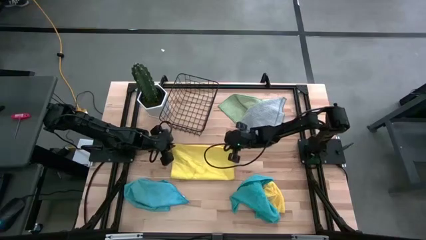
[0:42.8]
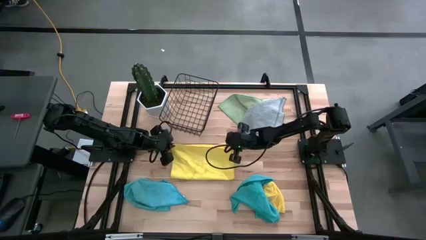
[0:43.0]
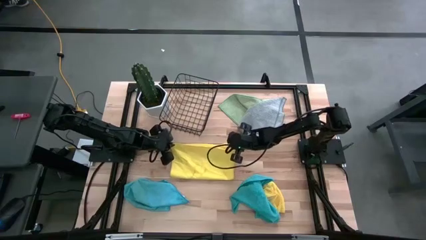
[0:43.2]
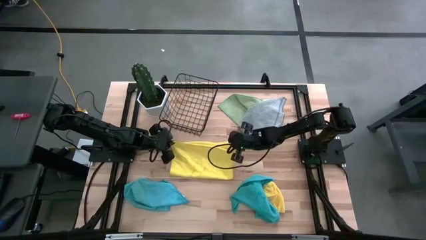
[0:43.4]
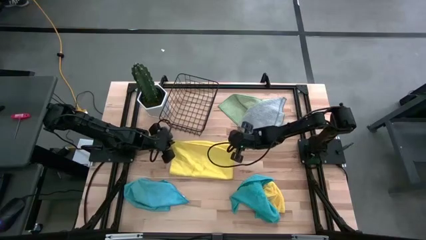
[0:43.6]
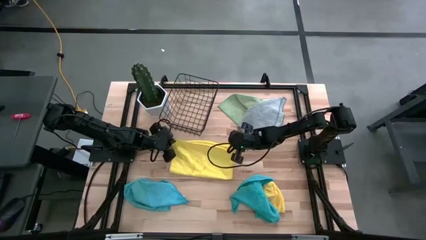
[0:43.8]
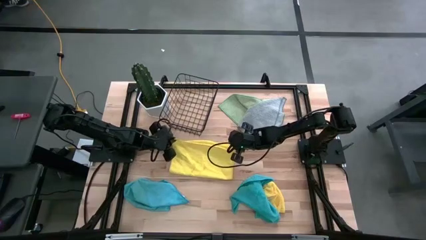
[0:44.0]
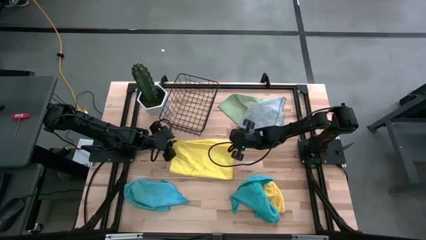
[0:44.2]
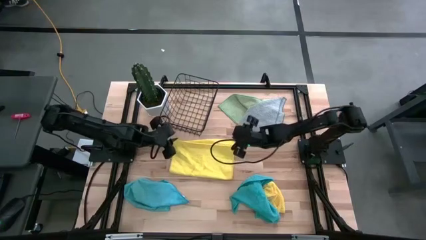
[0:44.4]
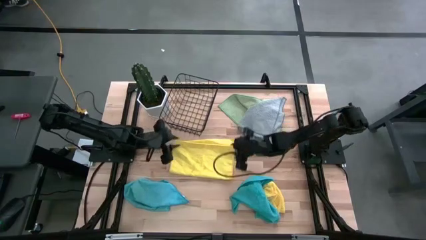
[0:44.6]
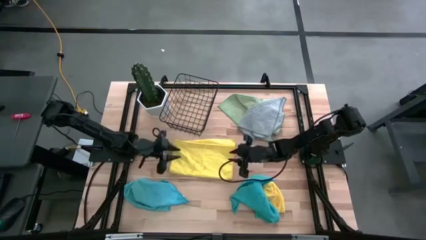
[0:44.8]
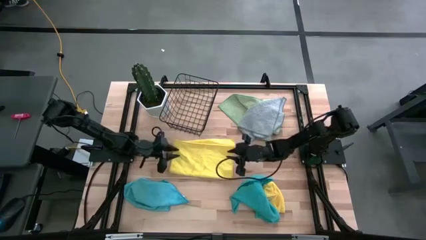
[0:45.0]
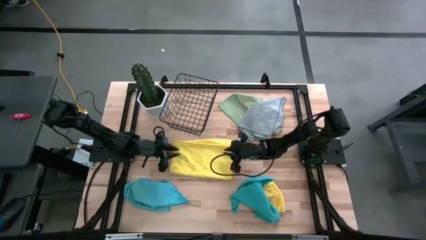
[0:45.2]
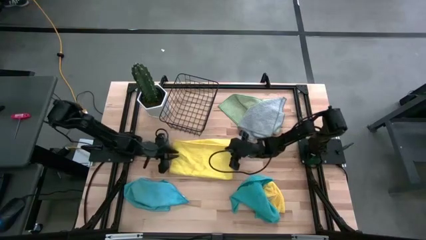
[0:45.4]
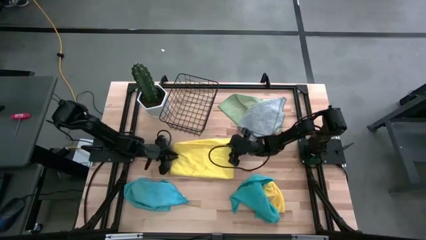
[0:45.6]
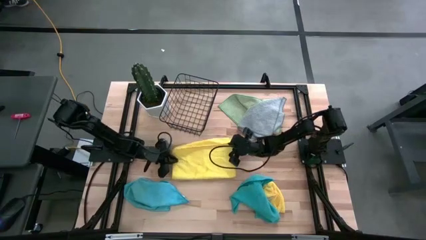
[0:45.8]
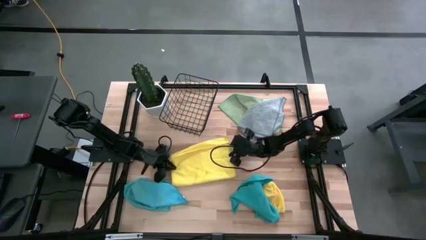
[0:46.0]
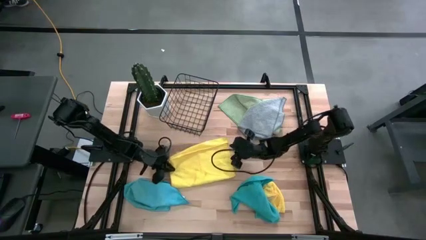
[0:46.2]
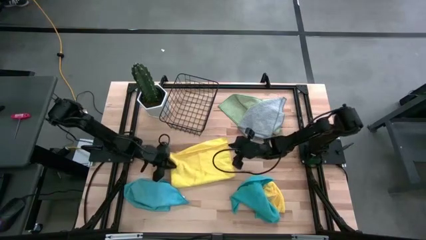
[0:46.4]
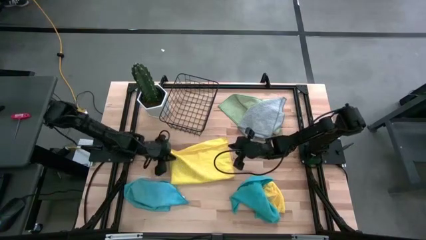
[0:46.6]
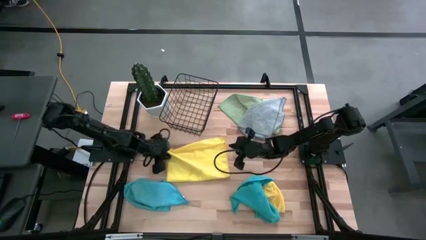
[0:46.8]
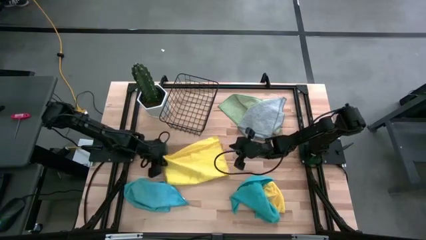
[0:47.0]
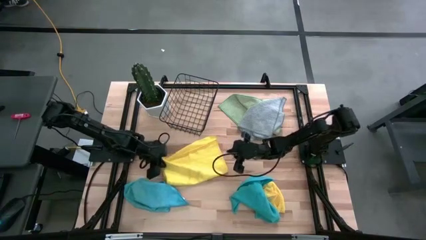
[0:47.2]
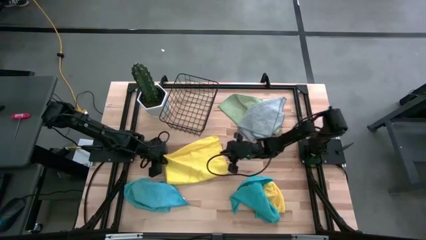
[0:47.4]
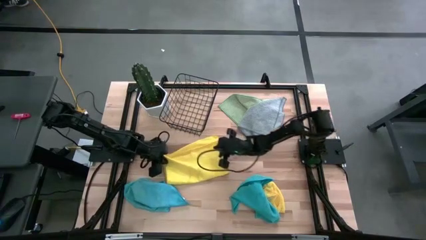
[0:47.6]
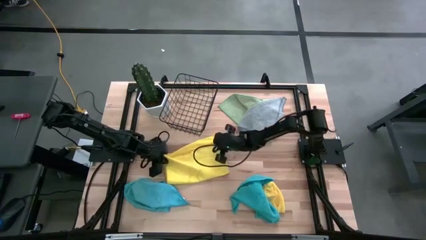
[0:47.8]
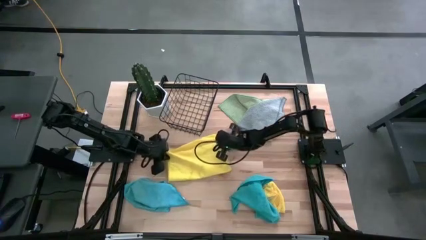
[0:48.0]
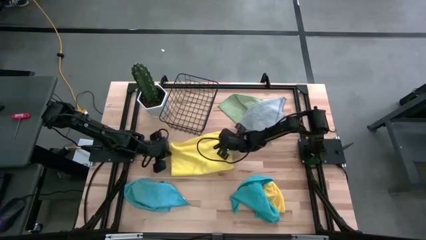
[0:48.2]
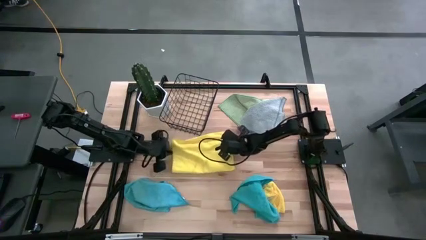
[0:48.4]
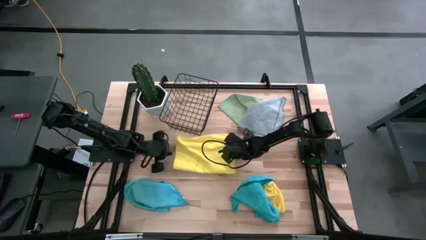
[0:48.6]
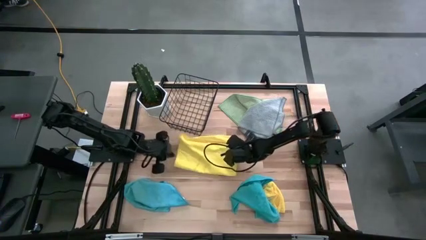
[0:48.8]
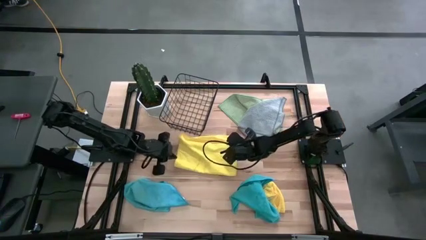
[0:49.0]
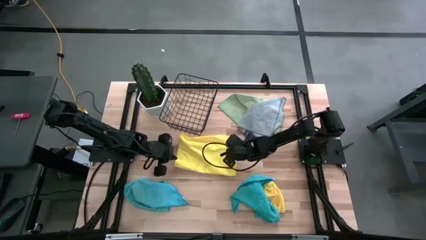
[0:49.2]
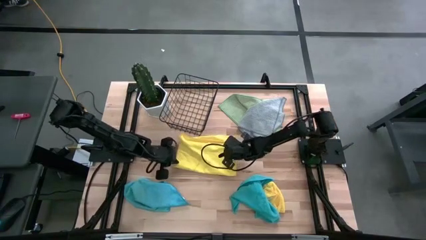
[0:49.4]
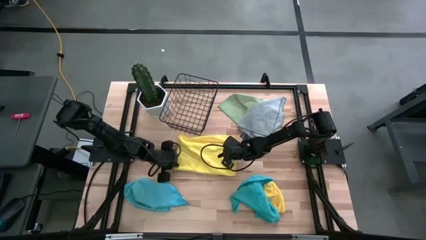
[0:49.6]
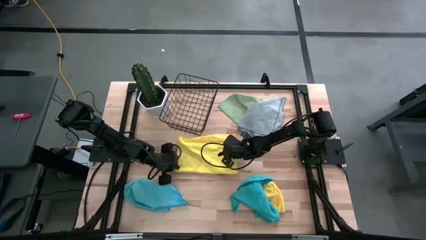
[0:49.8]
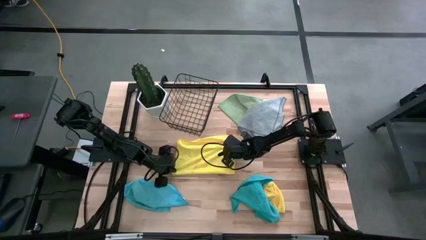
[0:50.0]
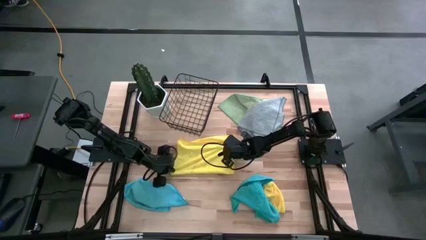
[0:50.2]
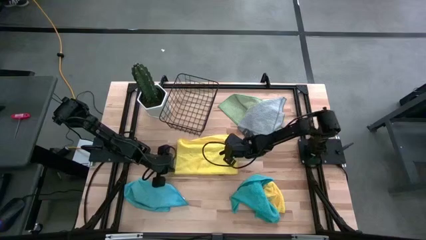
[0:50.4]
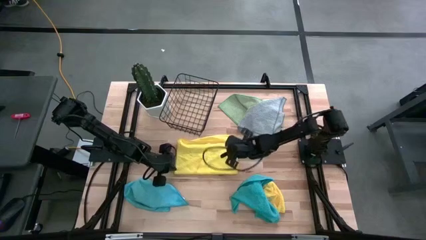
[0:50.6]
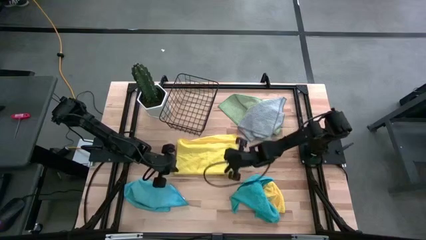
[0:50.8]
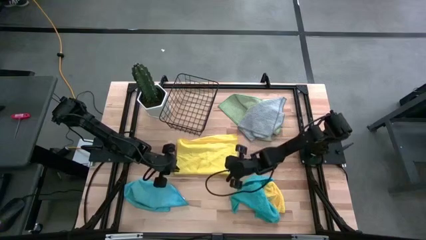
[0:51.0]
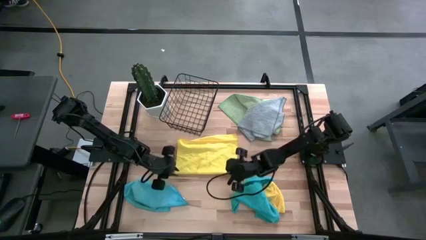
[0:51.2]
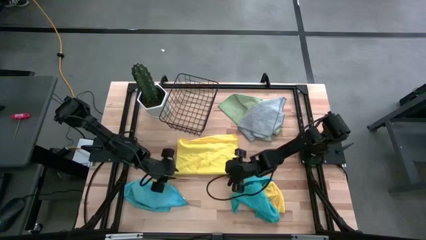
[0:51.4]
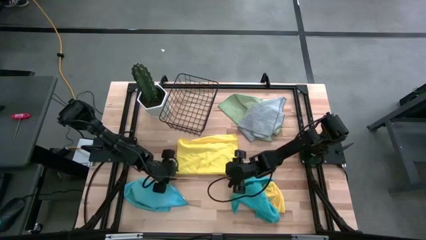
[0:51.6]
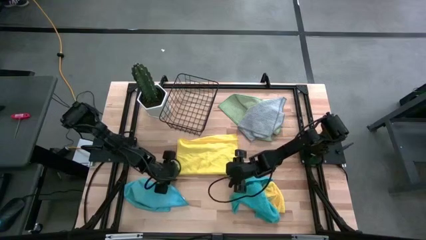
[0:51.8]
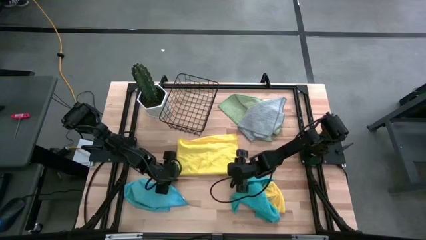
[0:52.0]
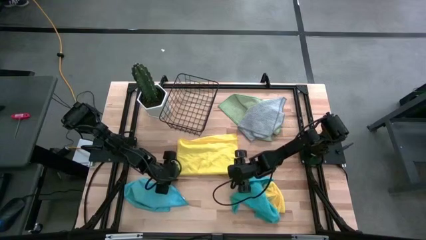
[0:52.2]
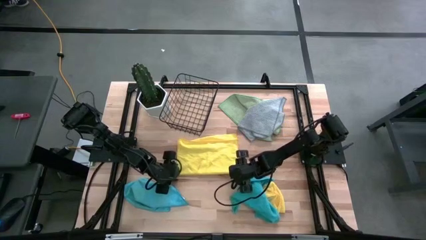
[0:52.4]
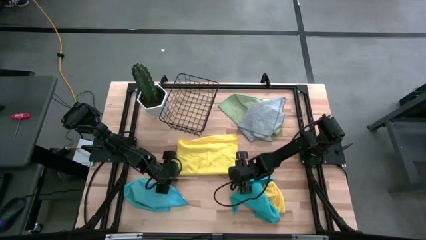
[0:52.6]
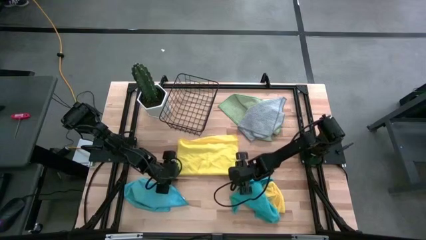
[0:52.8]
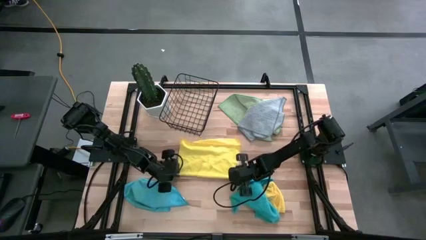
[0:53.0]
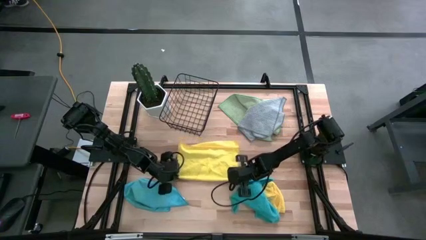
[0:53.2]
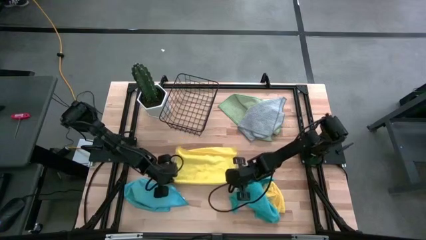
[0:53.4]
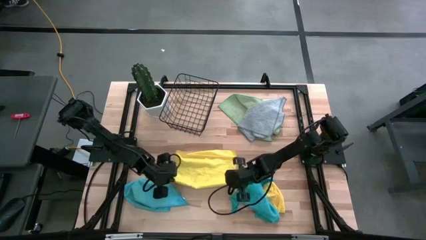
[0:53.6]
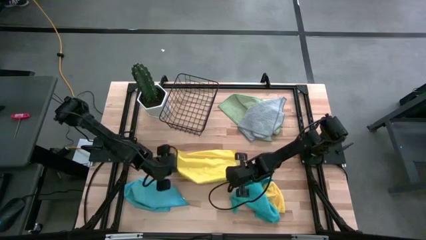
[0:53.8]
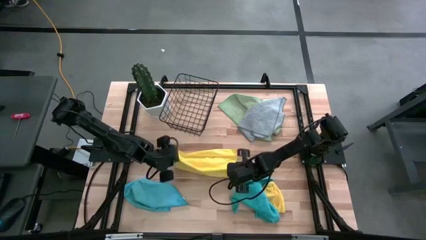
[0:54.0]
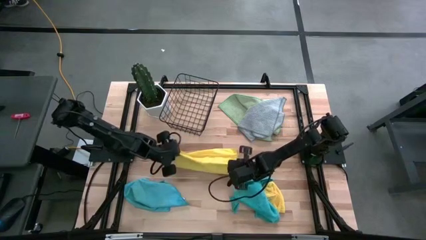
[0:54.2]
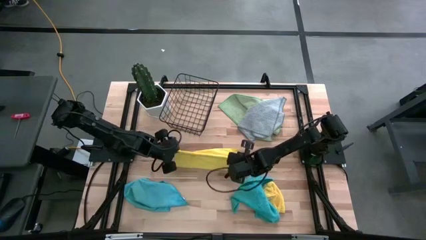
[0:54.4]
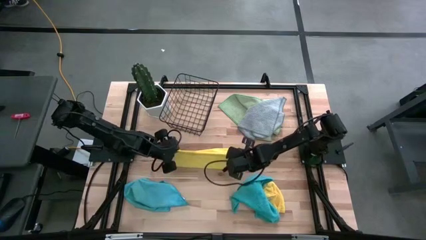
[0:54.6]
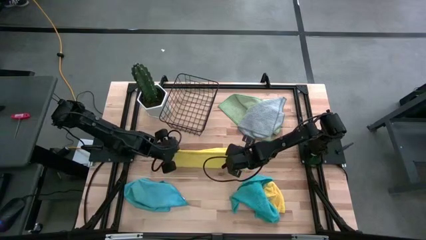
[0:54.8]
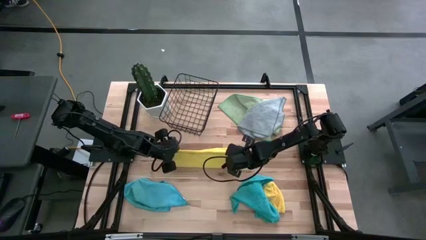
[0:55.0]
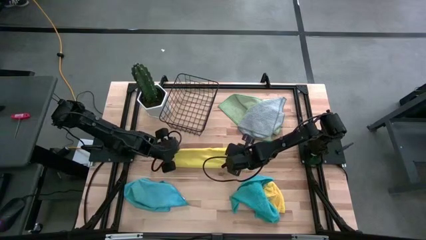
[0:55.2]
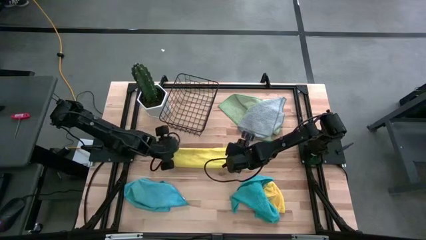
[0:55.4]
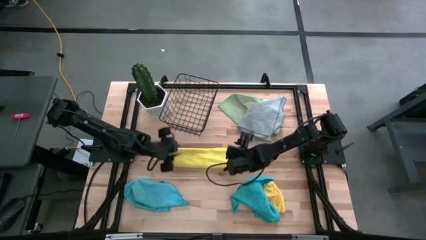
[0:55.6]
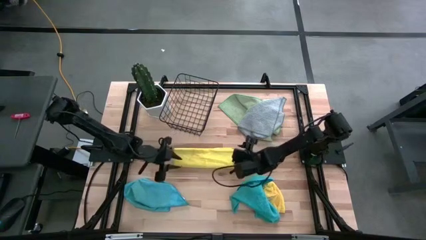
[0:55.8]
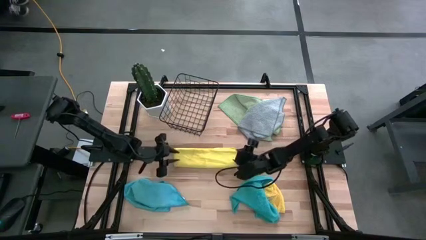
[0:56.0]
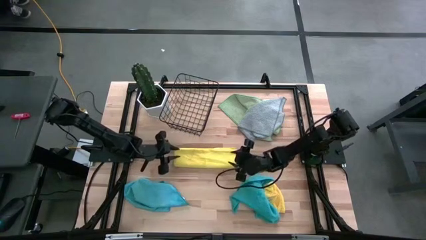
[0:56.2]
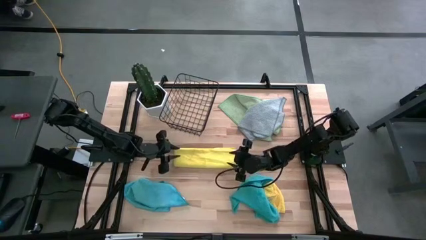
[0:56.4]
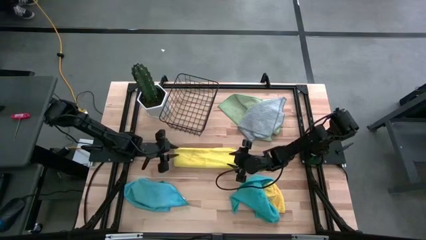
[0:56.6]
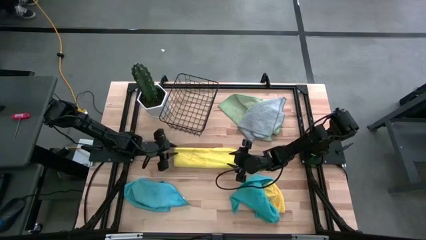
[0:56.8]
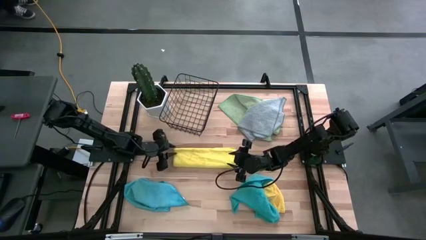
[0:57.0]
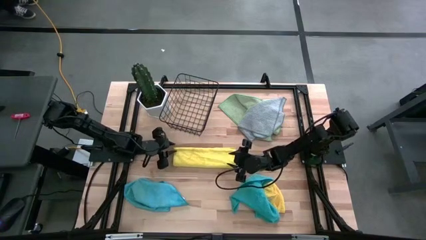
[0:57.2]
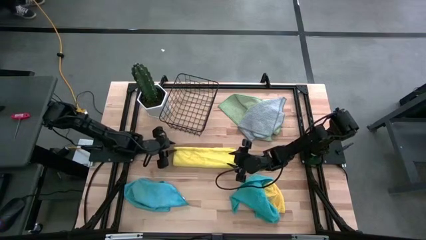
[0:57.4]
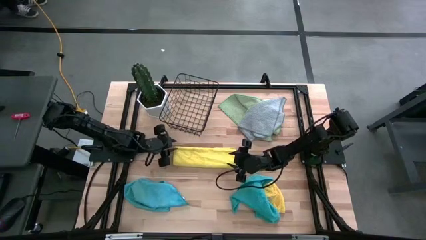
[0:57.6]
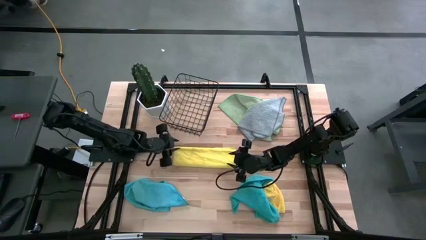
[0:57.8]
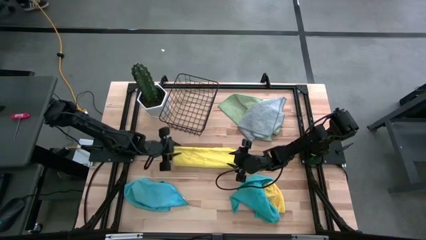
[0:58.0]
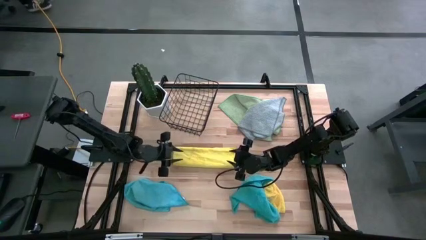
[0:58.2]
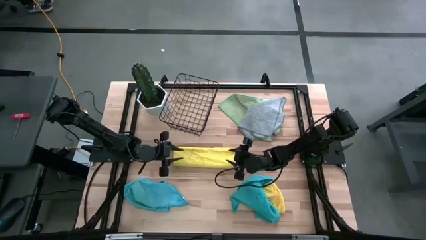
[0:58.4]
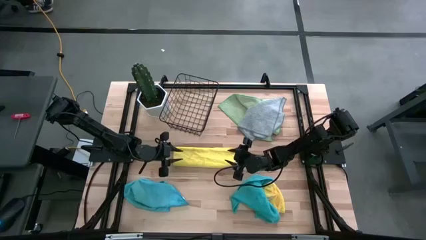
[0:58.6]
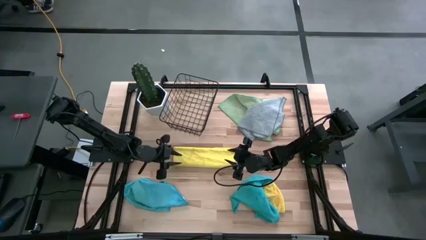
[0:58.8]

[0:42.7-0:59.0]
Task: Fold microfiber towels
Fold the left yellow microfiber cloth

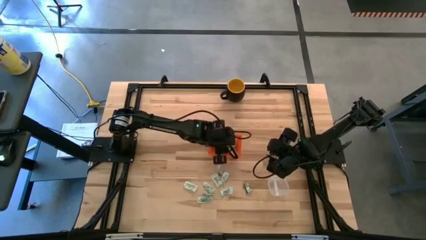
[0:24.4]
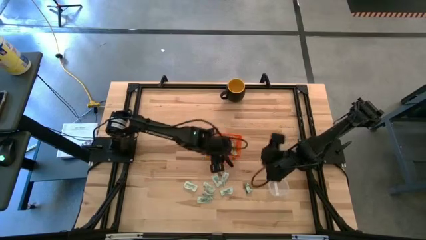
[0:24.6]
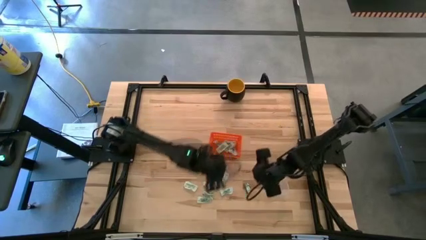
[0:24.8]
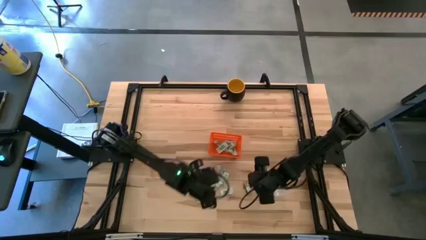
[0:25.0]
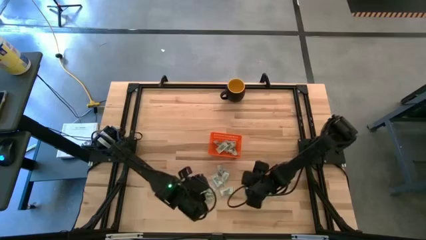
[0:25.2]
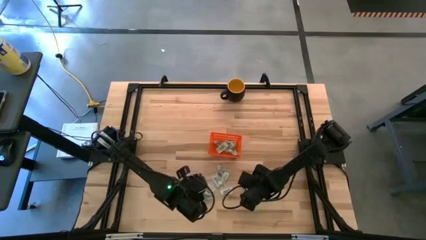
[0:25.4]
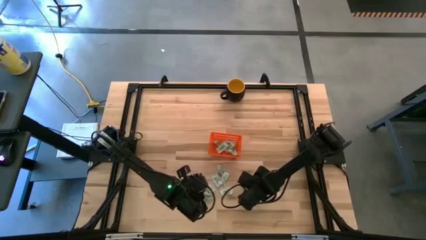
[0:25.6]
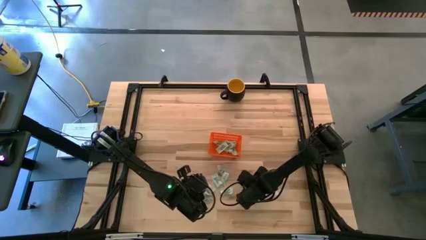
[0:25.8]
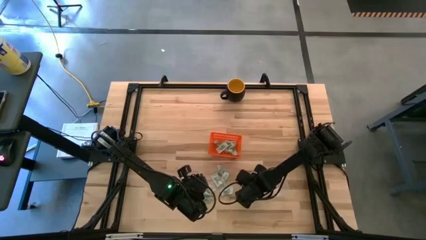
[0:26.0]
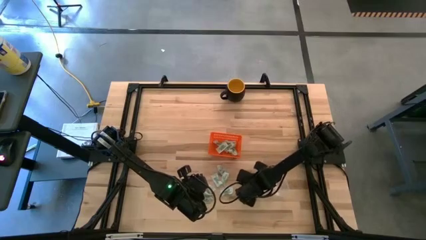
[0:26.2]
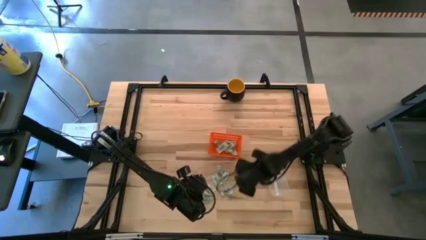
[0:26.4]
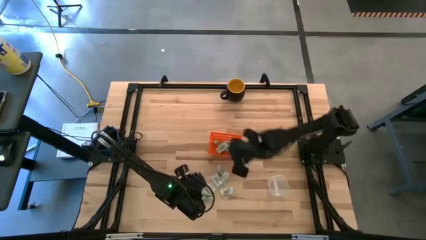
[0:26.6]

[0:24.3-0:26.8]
Task: Pick and place items into bin
Put the green stevia packet into the orange bin
